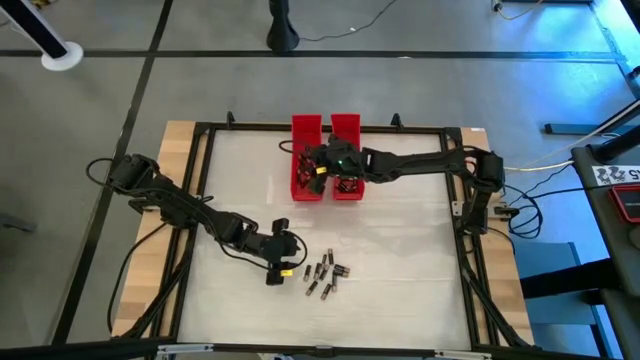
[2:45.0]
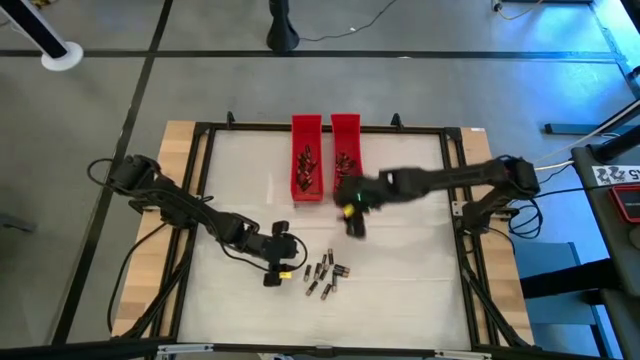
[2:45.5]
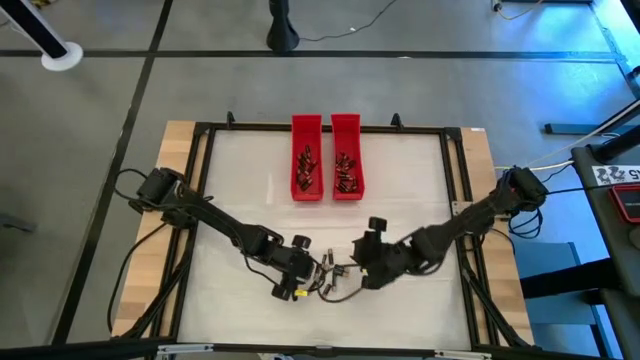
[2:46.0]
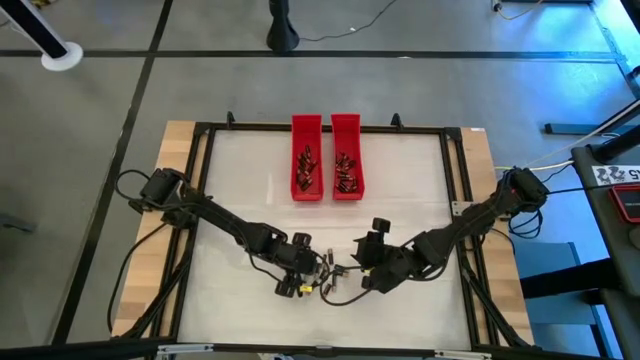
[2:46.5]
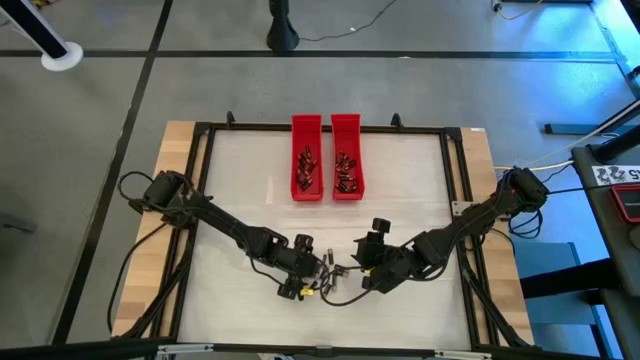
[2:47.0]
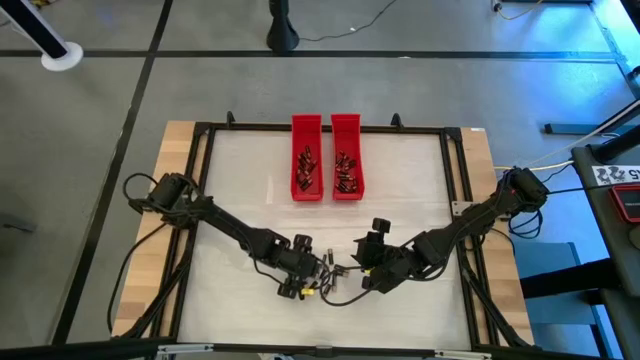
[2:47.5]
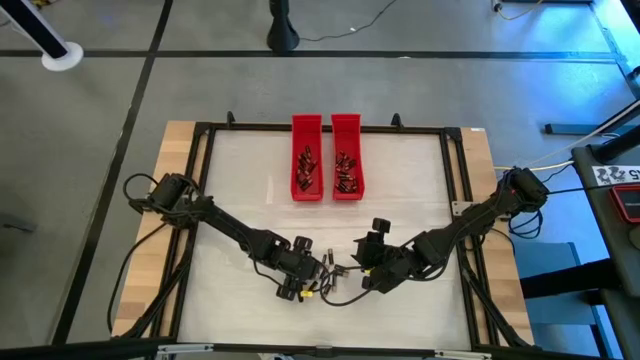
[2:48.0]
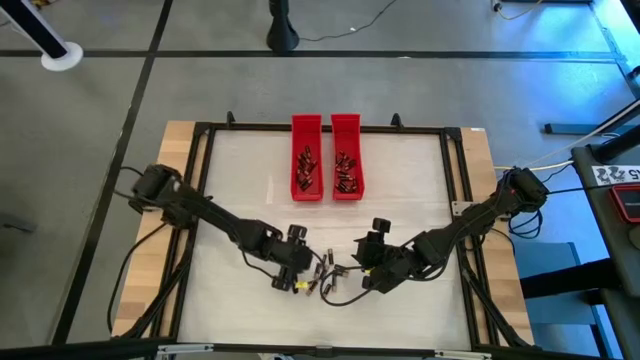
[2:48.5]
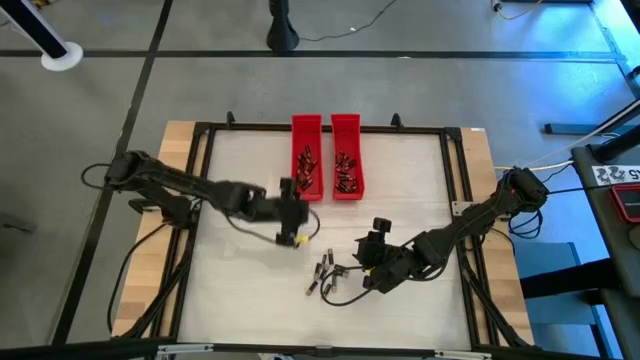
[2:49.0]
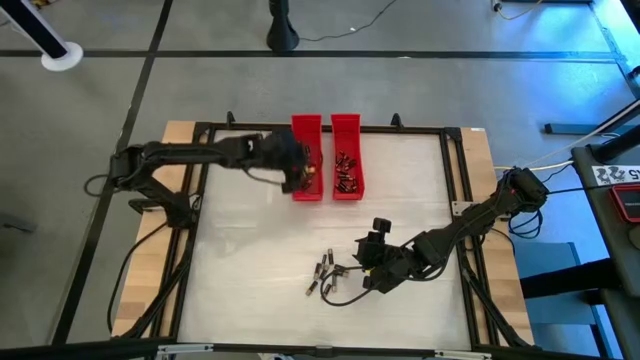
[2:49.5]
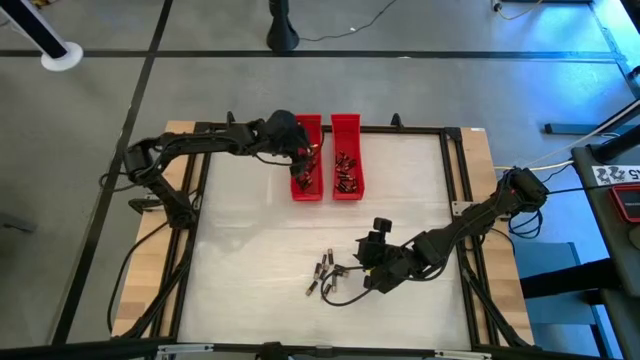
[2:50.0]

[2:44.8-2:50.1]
Task: Sort batteries
Put the large black battery into the left red bin

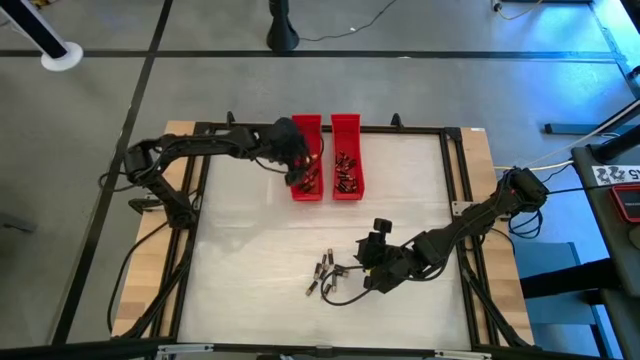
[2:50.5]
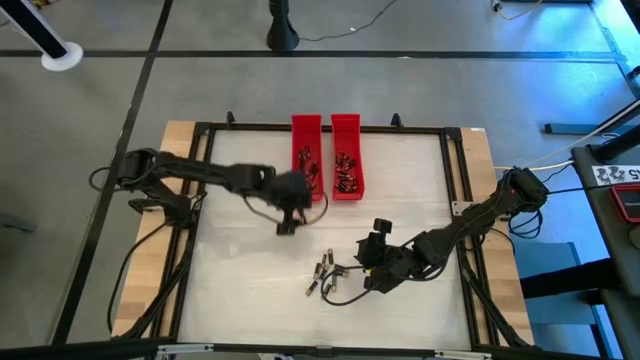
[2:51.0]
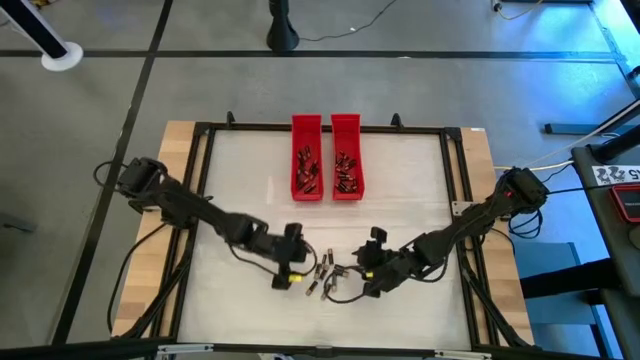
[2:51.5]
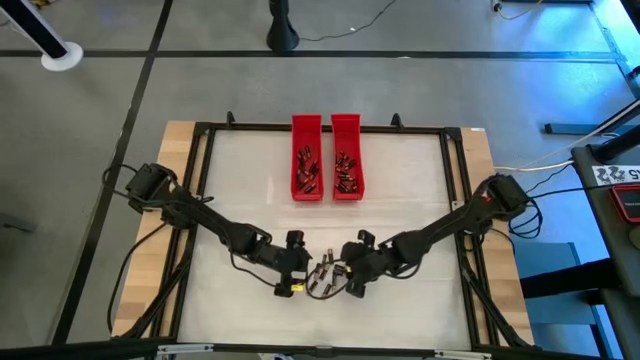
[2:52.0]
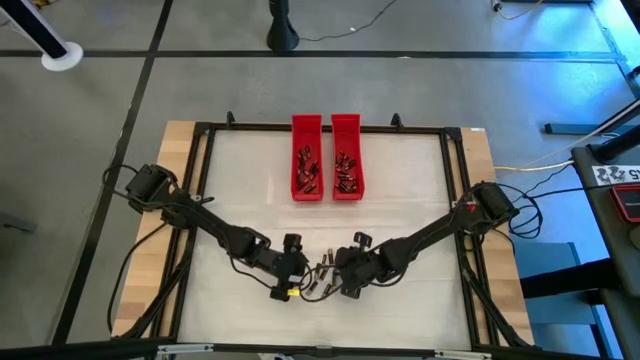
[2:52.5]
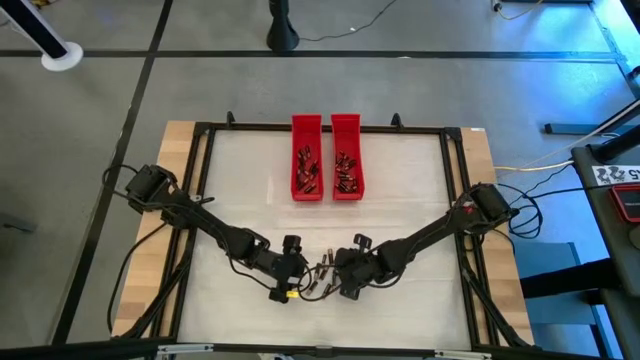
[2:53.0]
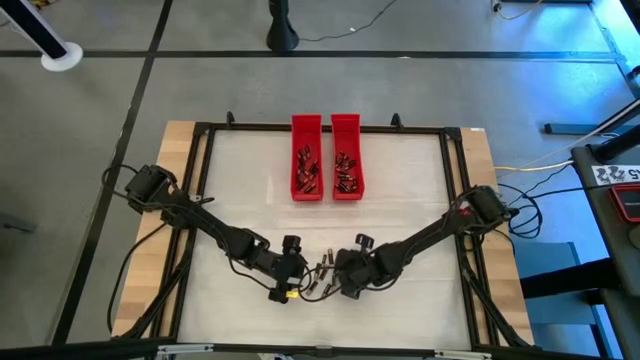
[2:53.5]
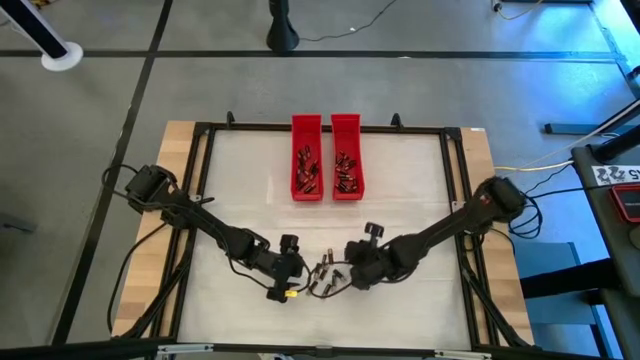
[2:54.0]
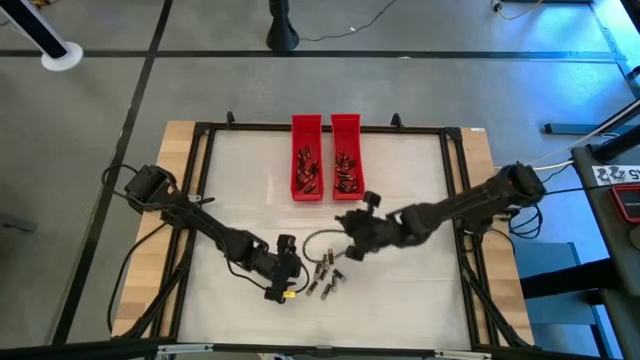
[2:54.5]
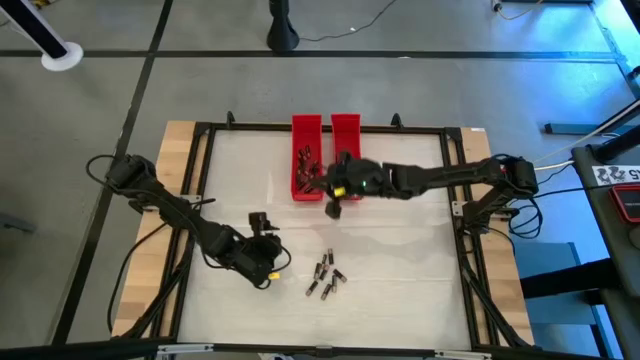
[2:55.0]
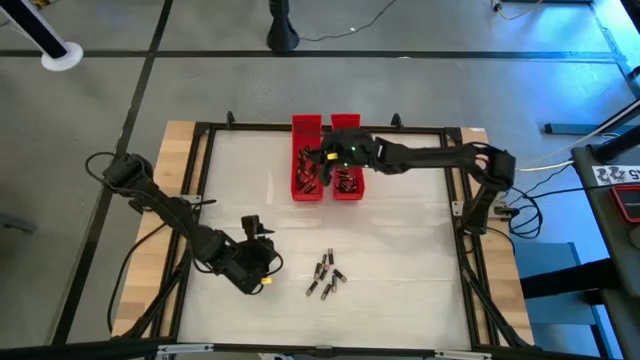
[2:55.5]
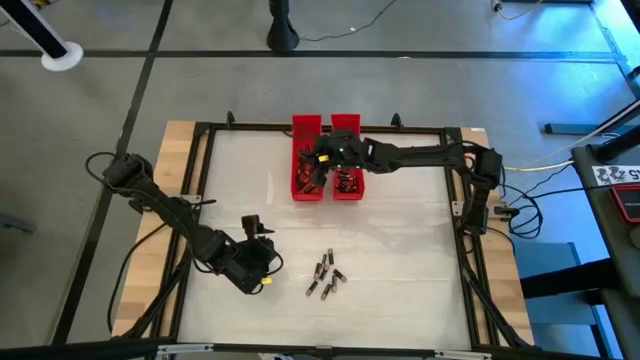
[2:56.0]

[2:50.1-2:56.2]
Put the large black battery into the left red bin

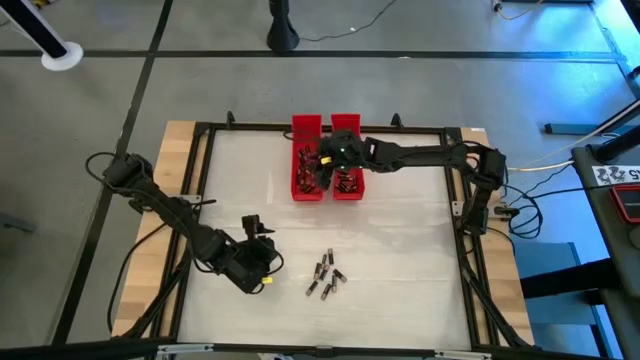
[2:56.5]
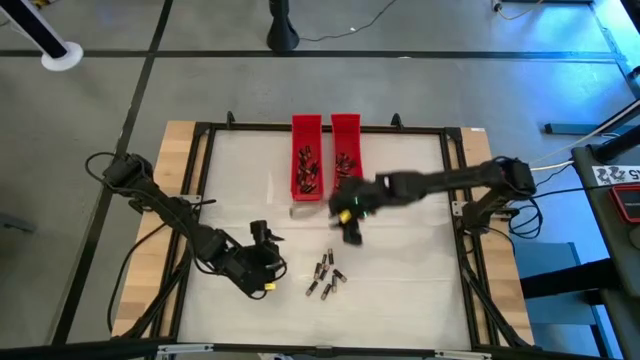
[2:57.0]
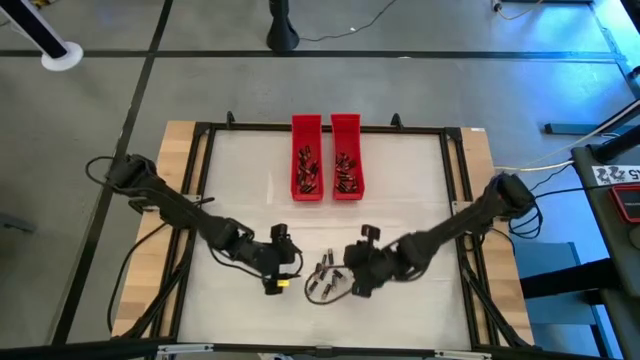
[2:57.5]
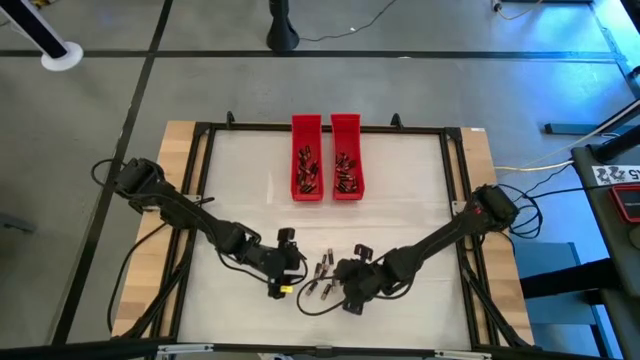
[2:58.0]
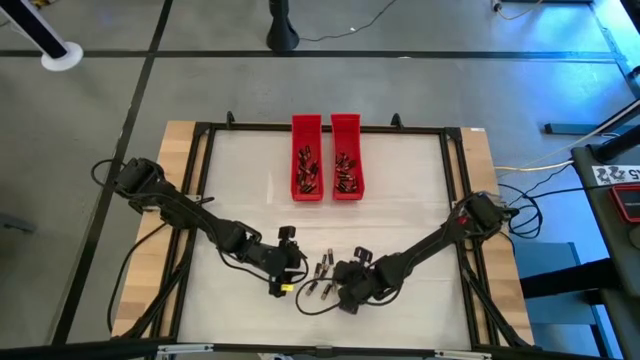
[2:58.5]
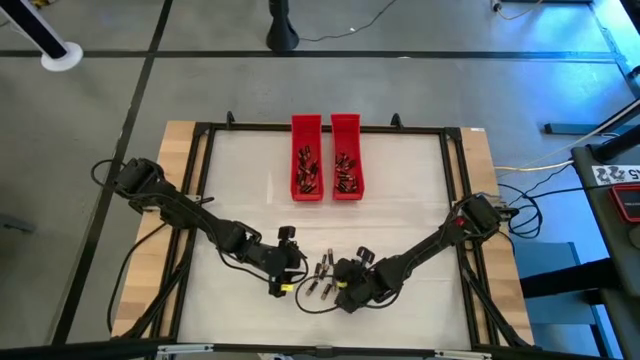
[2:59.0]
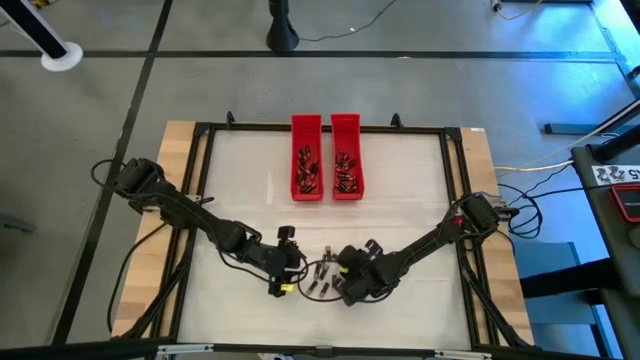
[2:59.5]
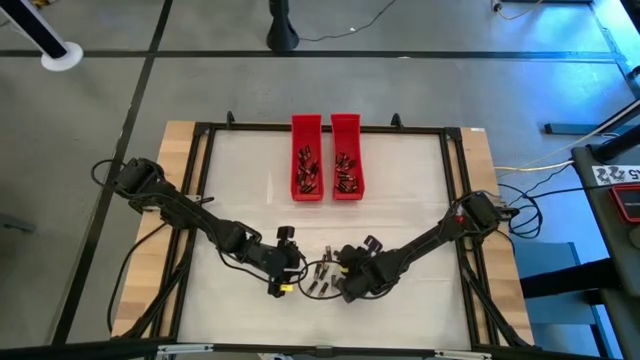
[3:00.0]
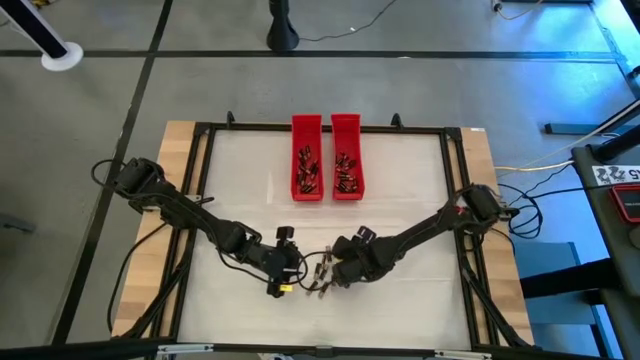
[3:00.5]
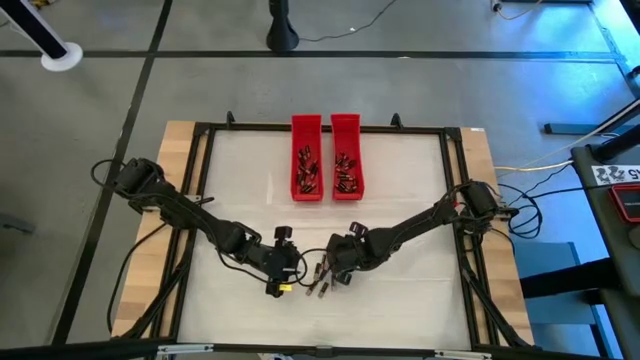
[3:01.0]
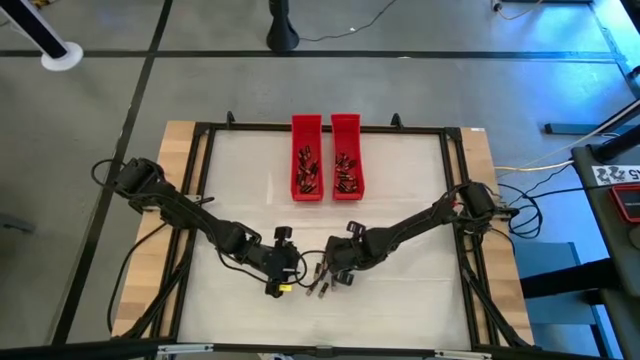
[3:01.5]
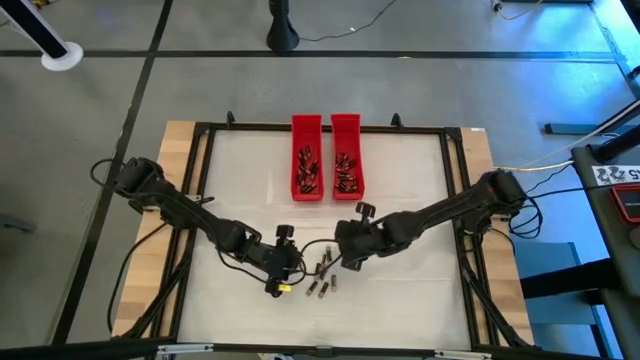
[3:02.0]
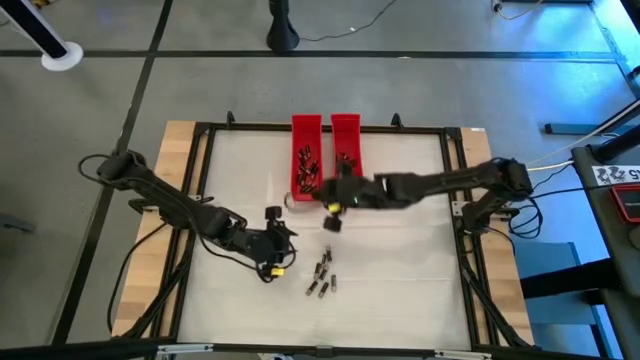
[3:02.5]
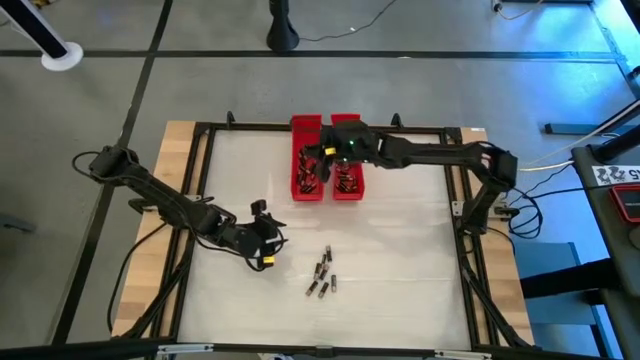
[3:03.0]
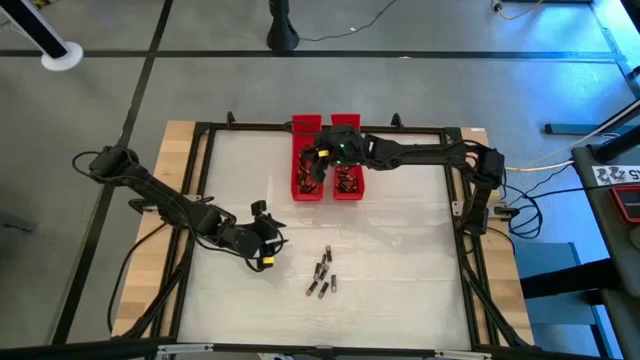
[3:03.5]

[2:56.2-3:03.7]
Put the large black battery into the left red bin

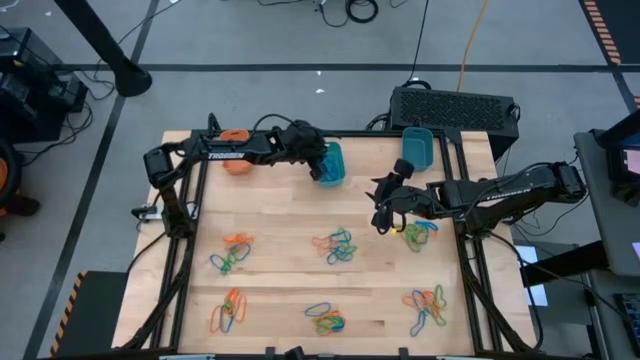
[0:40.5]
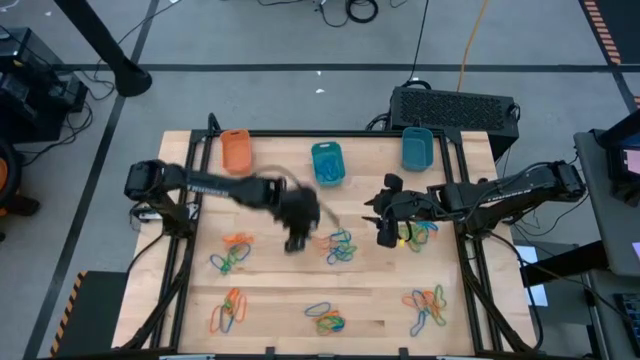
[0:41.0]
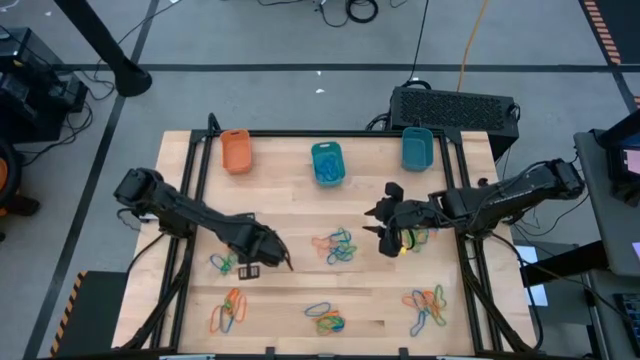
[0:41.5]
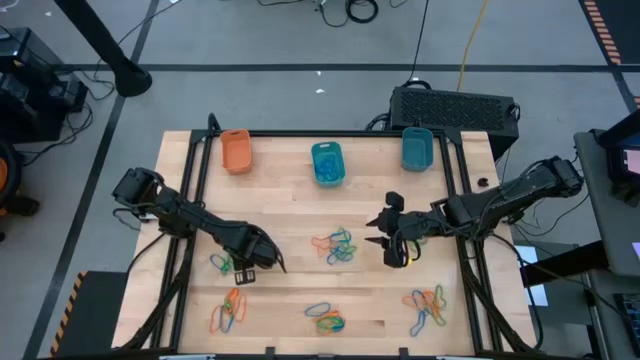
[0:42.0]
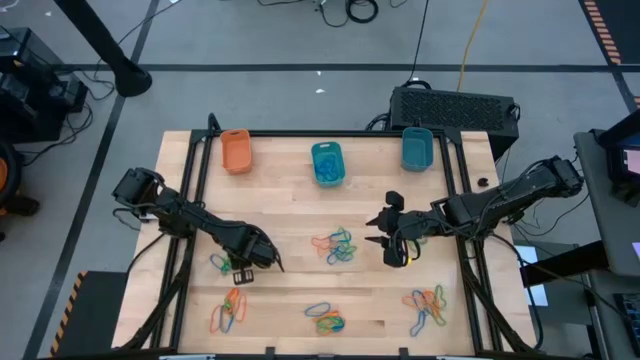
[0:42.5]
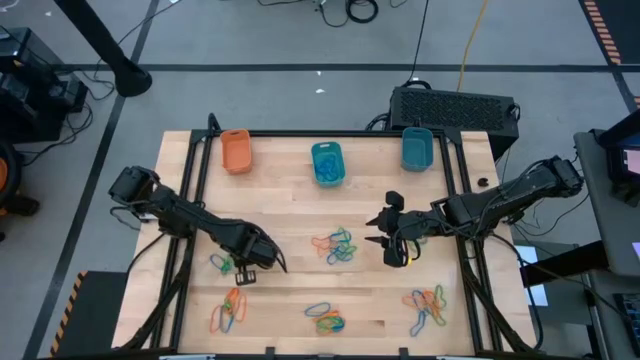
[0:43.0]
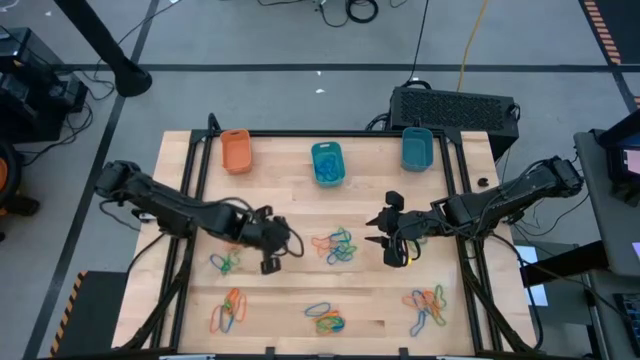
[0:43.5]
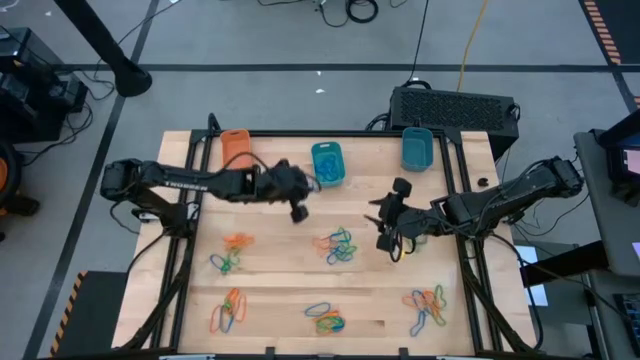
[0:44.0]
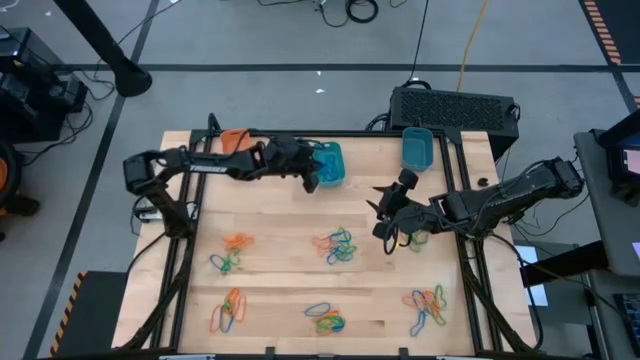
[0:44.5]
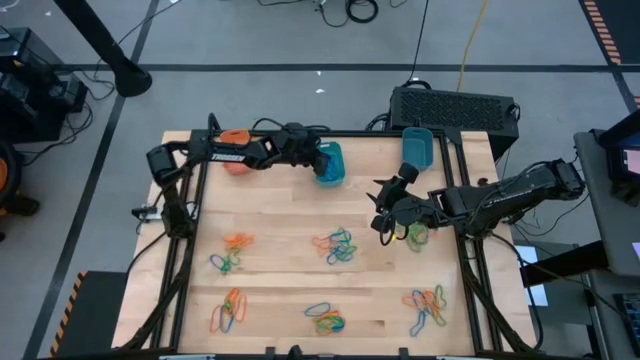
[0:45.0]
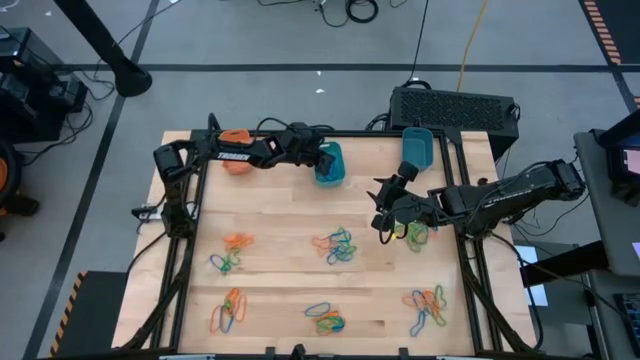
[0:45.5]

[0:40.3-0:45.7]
Task: Sort rubber bands into baskets
Put the blue rubber band into the light blue bin
